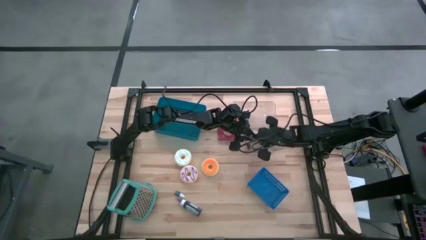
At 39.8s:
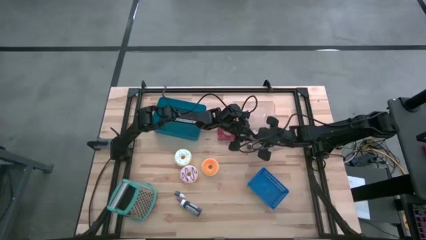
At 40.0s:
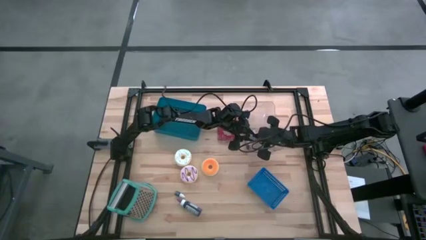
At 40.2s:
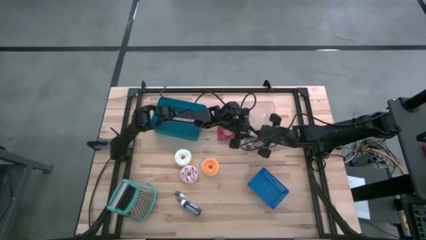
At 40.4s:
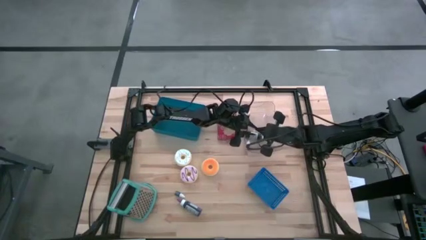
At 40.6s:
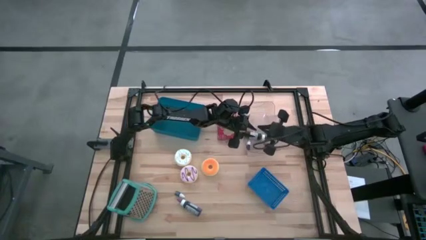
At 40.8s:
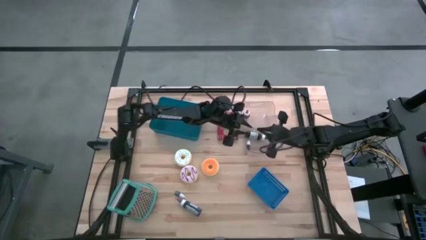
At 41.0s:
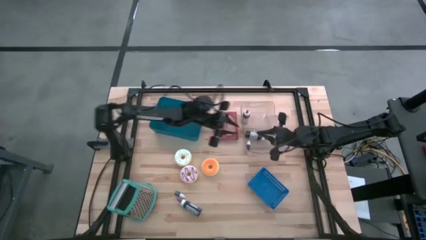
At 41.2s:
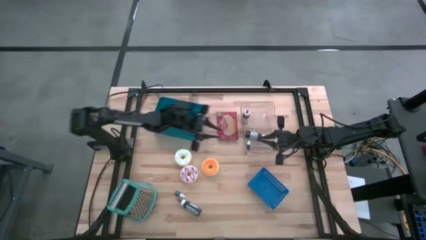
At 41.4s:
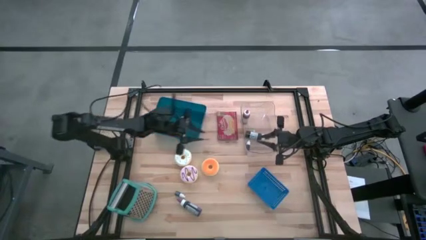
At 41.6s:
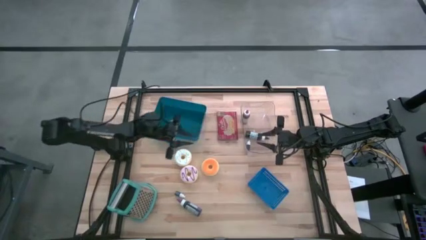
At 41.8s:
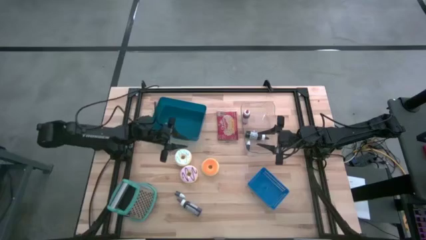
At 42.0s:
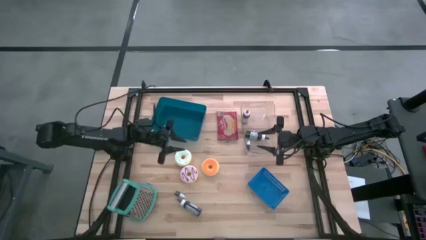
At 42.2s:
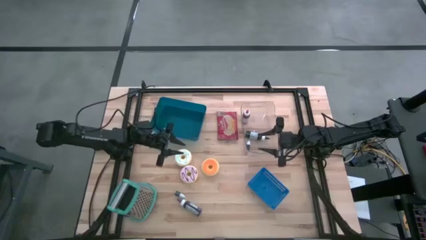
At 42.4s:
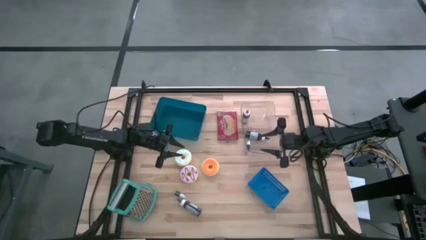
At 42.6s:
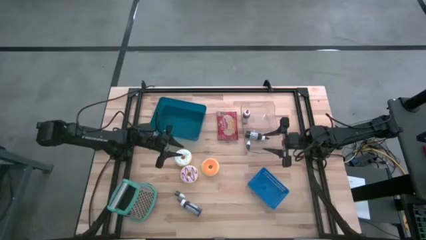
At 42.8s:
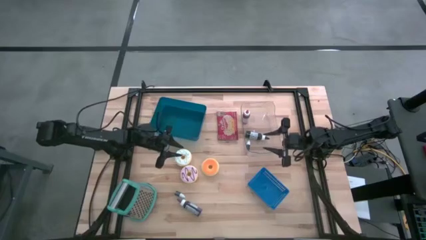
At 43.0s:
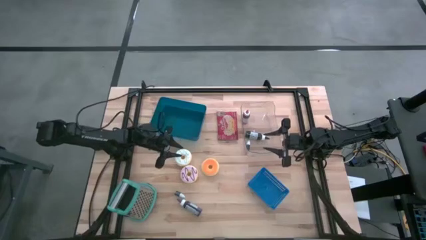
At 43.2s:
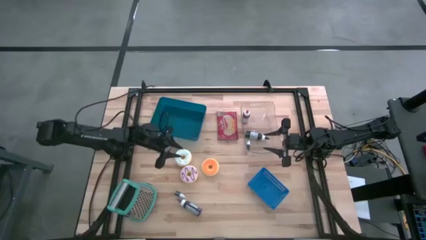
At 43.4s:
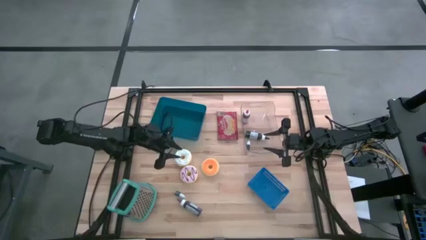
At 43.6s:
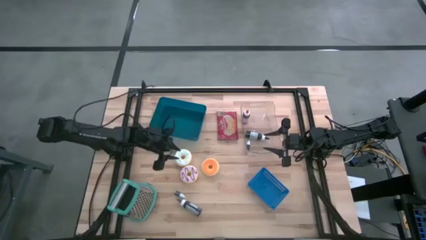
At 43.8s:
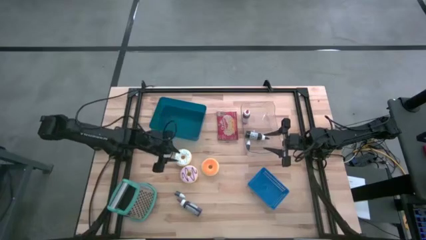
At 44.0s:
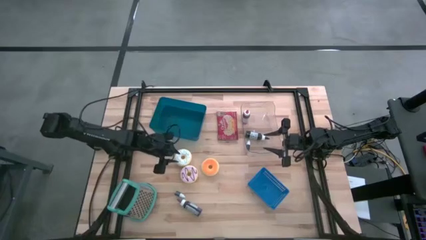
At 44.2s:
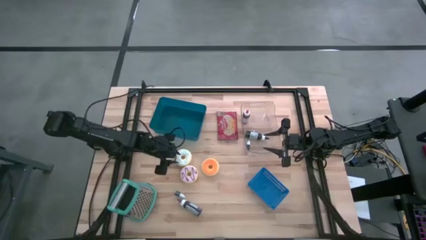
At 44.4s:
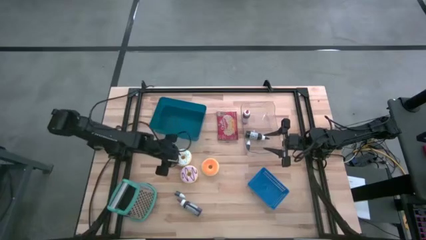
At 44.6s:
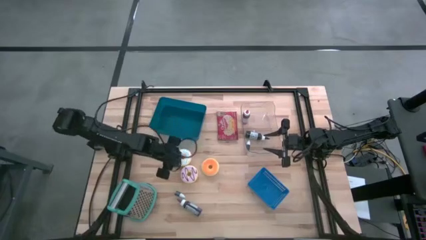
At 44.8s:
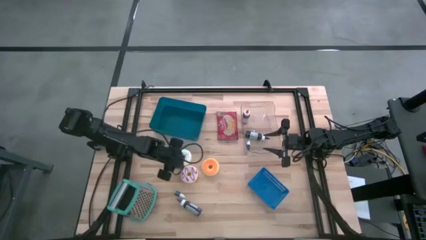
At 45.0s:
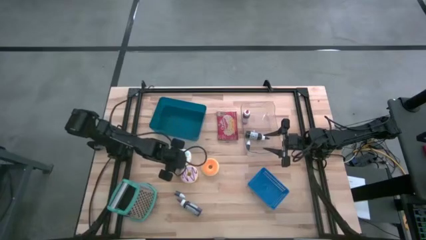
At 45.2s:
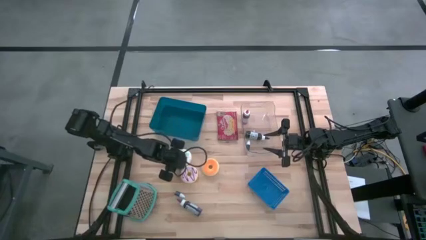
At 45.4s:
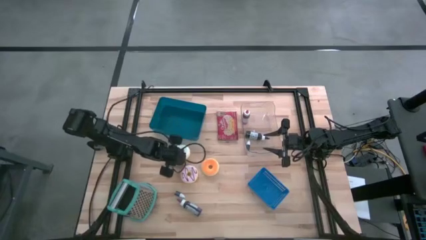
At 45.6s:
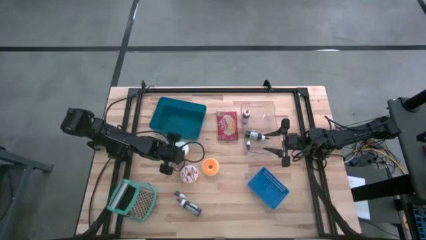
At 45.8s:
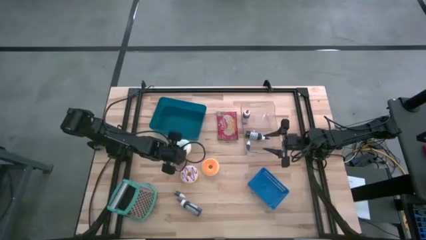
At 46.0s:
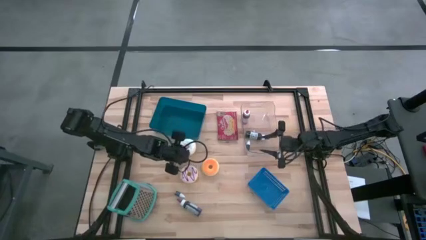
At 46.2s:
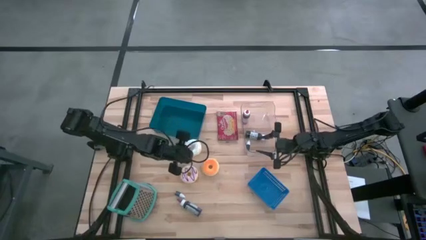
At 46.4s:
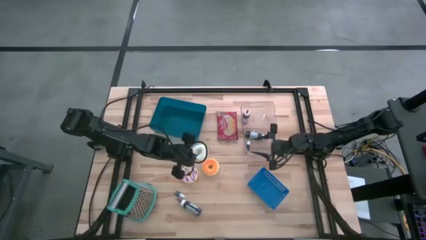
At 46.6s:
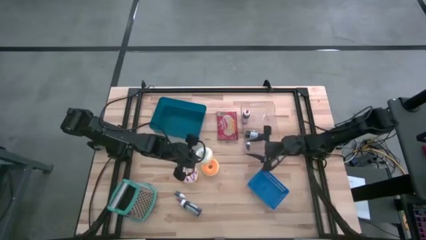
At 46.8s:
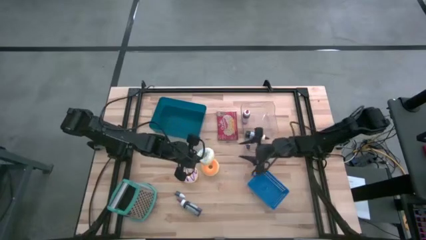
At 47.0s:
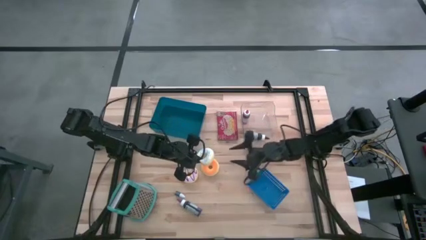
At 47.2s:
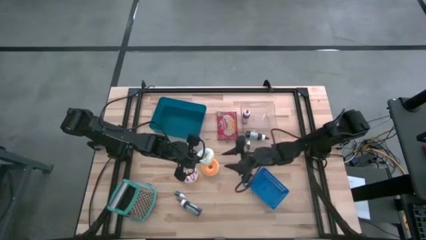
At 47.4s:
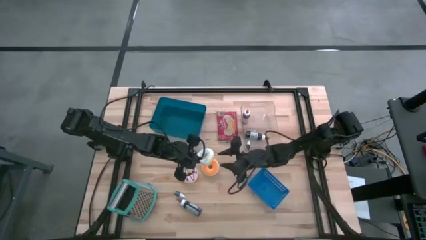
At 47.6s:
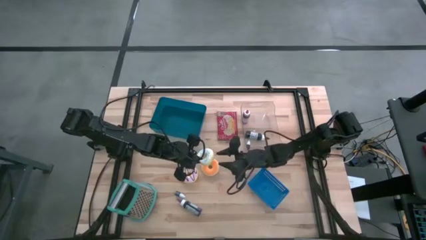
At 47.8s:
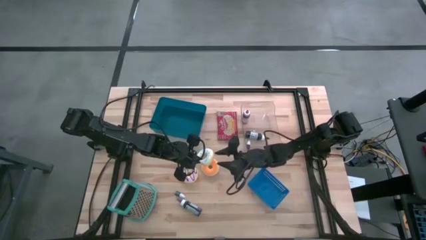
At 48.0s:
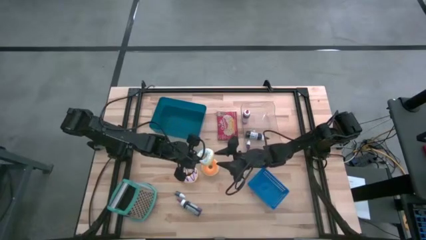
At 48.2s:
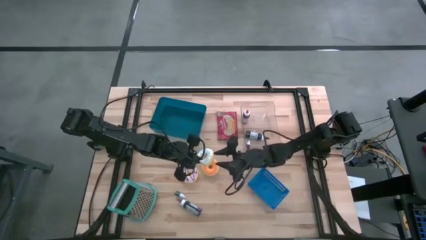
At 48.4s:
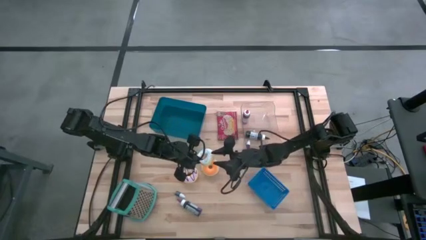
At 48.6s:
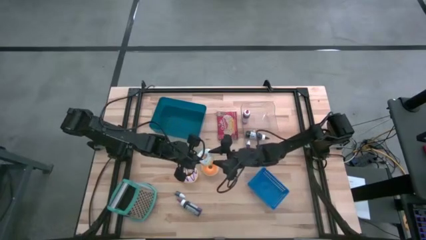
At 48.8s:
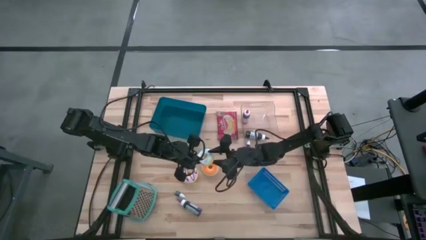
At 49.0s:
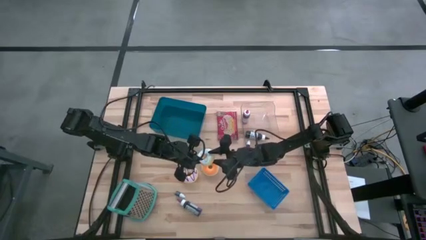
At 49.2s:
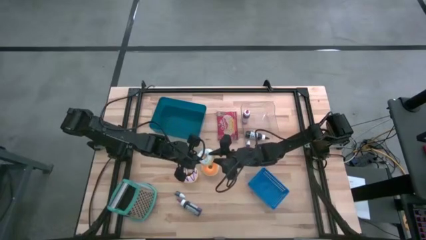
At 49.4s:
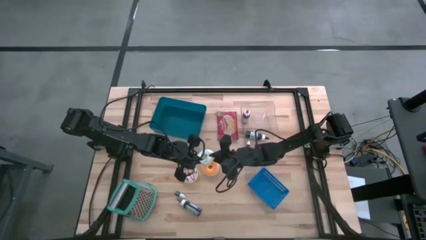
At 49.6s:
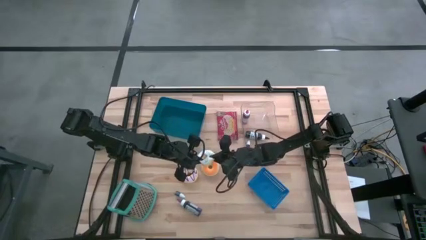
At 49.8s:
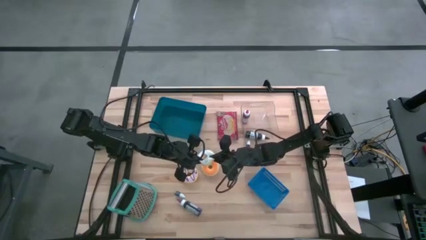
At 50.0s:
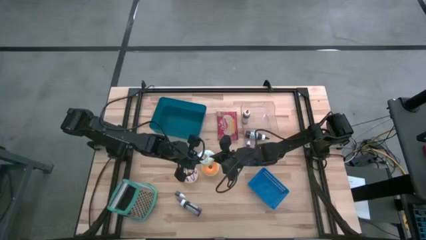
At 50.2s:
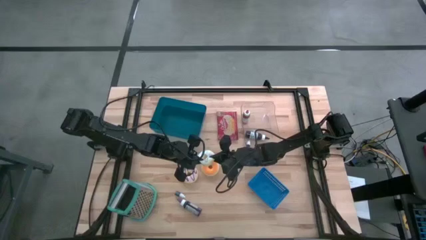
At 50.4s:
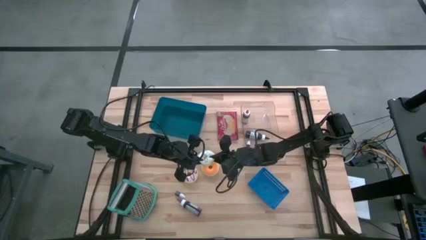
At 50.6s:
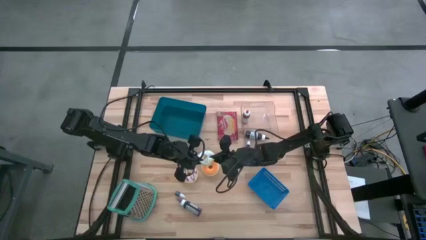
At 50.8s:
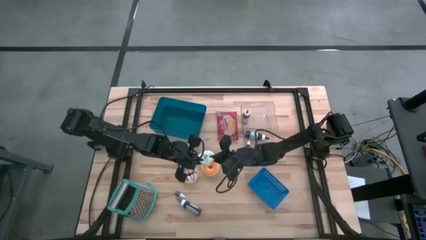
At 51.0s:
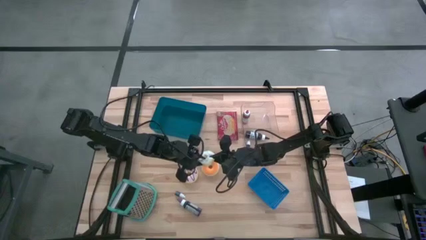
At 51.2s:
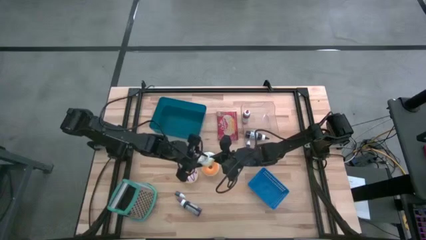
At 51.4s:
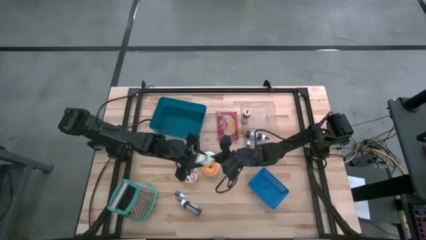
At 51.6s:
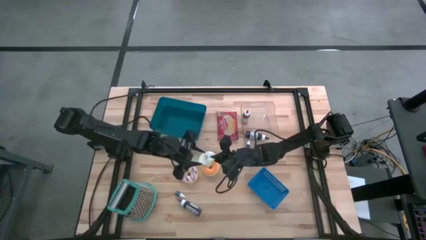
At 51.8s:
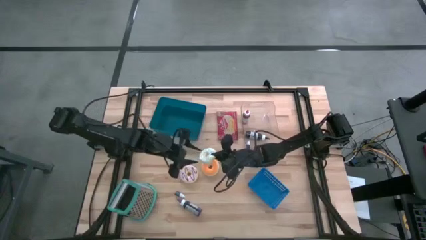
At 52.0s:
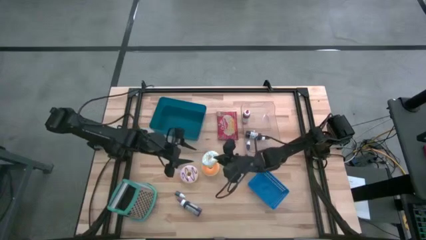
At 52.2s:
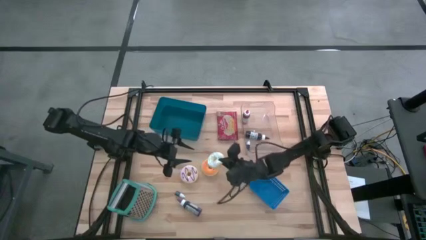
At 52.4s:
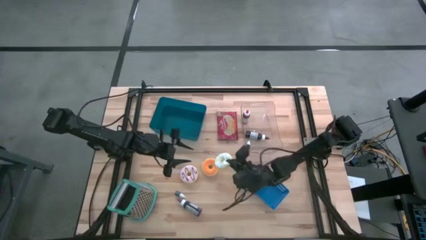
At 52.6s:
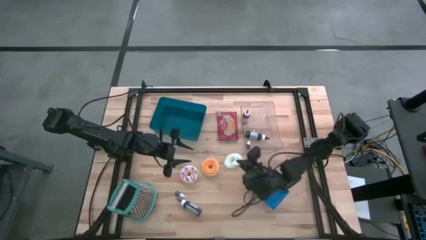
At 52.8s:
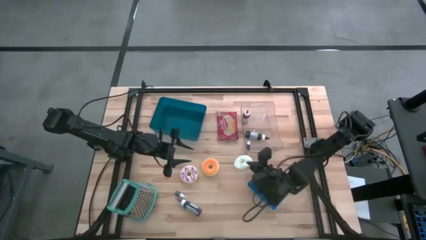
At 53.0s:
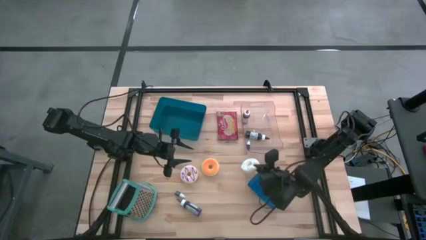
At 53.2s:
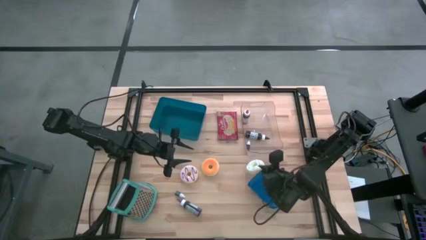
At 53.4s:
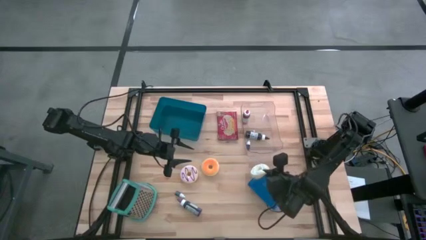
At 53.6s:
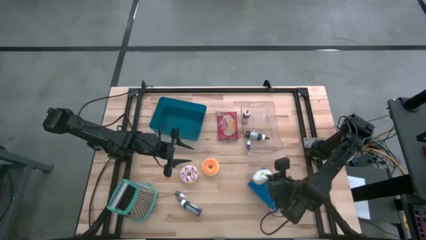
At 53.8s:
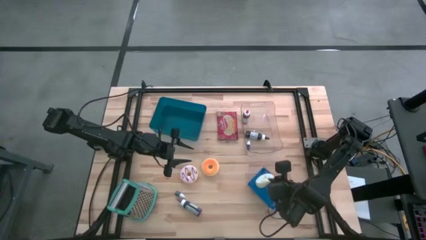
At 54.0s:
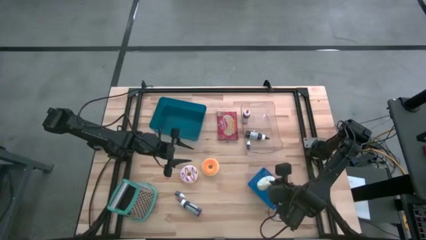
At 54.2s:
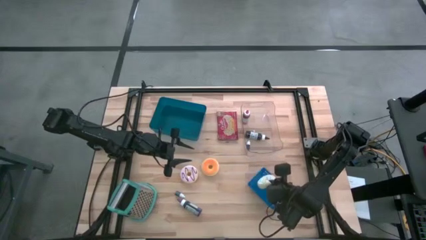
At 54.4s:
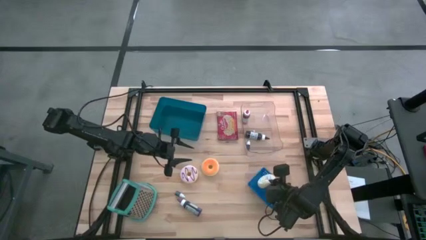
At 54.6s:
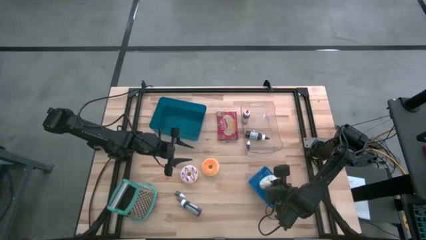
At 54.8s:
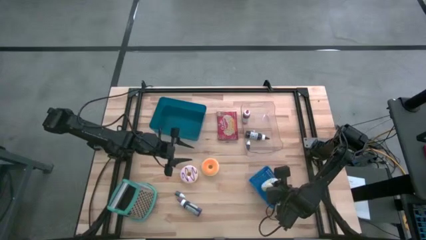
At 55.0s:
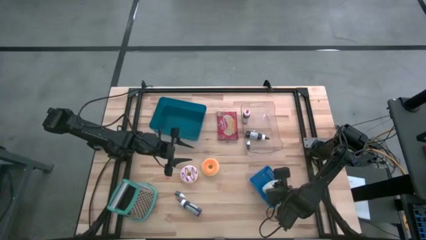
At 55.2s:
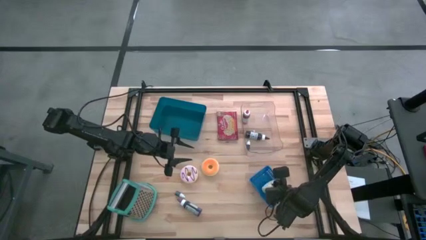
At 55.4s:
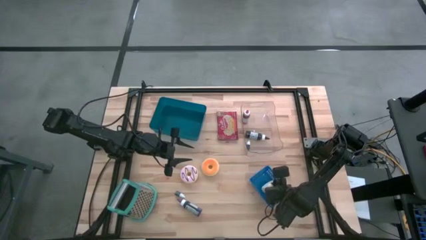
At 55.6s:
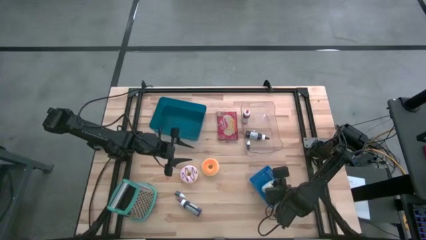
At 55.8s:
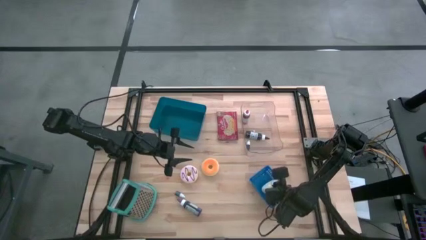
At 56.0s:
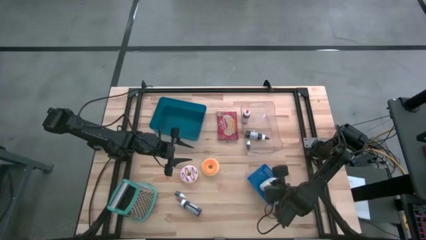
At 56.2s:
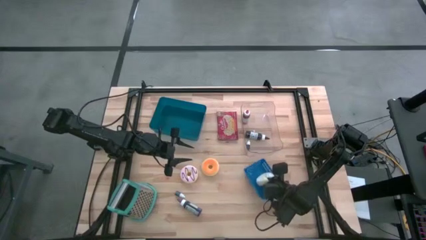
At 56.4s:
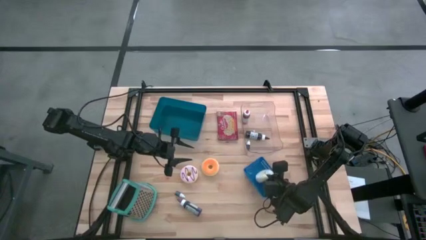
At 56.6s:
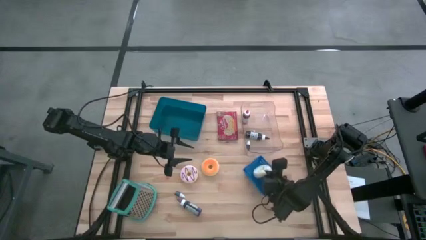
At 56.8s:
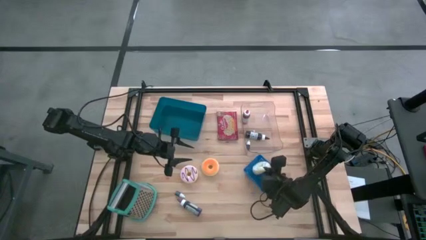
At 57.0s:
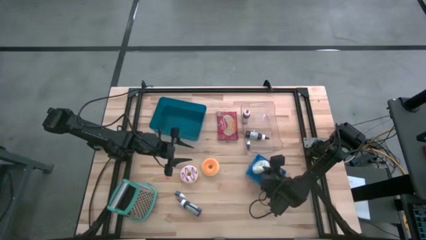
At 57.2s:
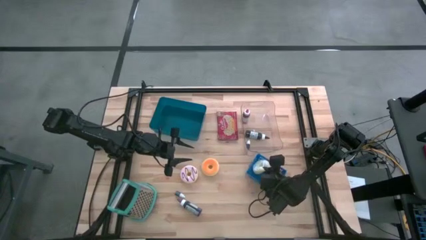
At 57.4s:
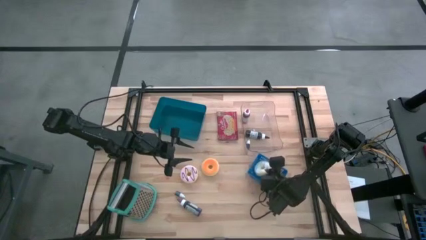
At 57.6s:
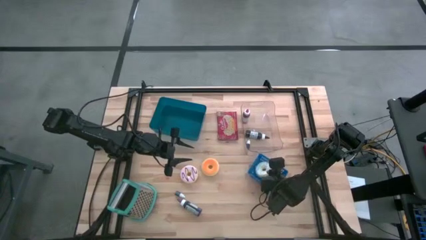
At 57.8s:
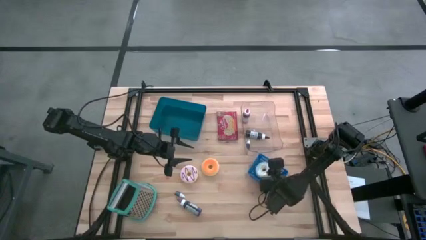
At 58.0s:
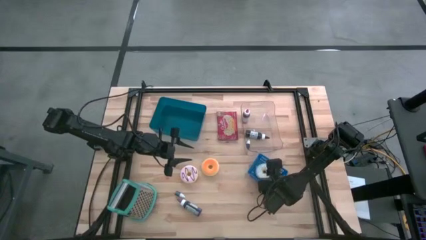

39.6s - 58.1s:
Task: Pick & Place Food Item
Put the white doughnut into the blue bin
